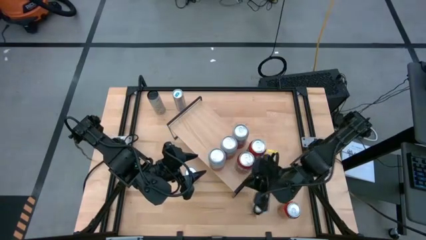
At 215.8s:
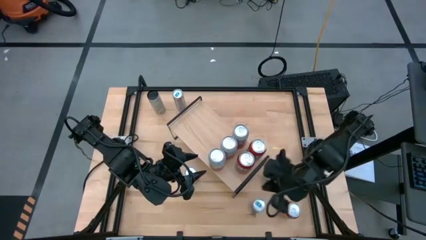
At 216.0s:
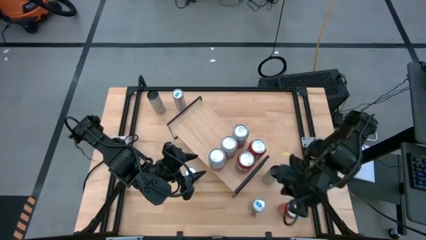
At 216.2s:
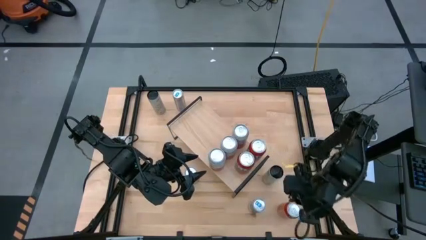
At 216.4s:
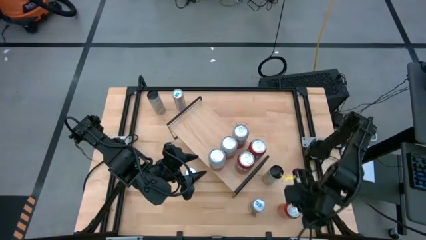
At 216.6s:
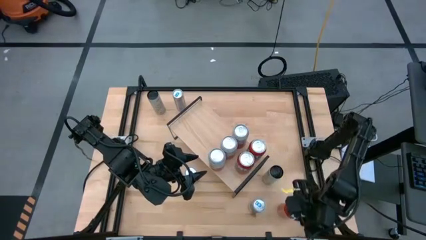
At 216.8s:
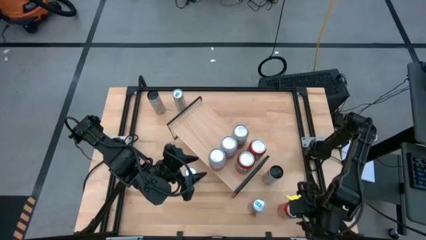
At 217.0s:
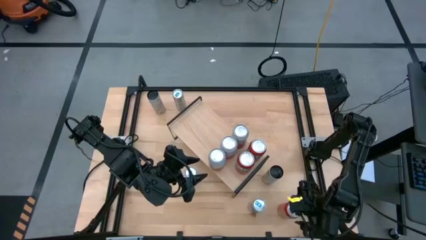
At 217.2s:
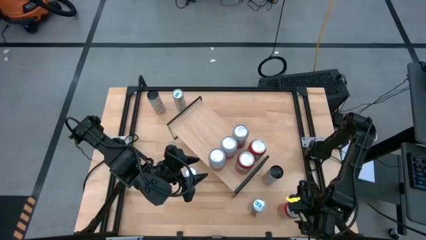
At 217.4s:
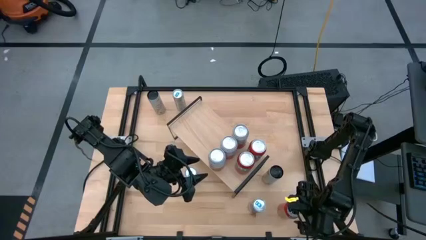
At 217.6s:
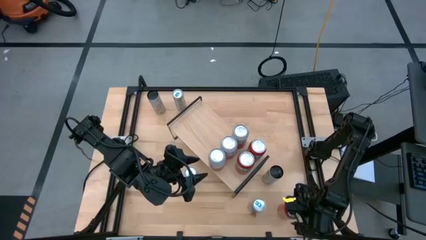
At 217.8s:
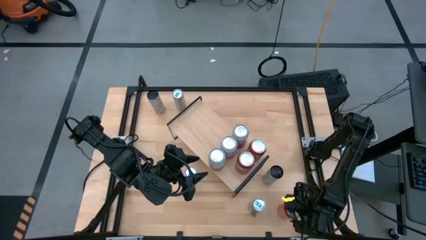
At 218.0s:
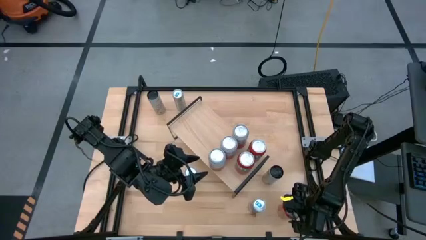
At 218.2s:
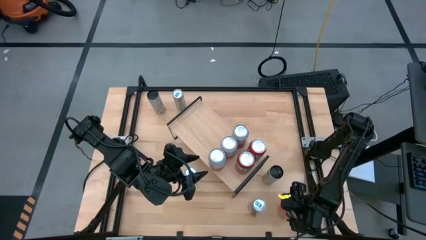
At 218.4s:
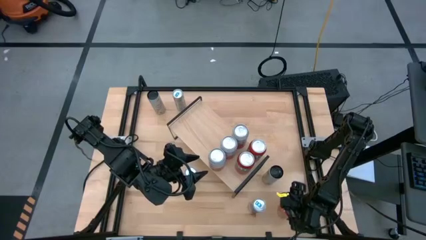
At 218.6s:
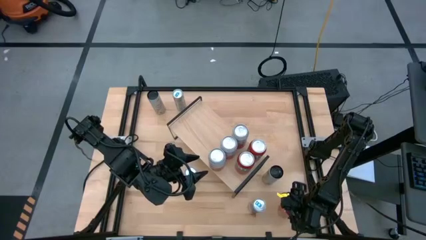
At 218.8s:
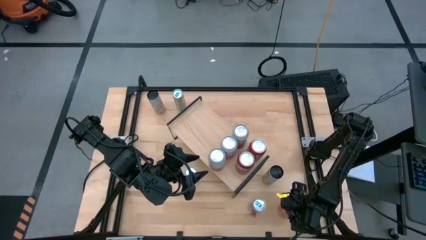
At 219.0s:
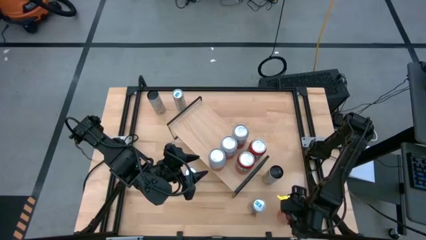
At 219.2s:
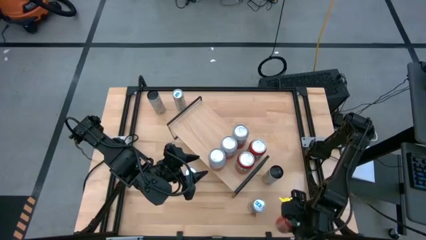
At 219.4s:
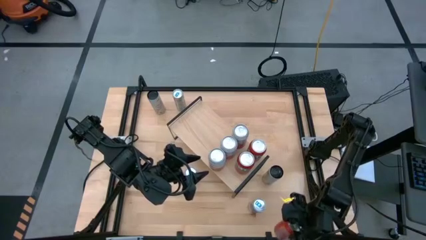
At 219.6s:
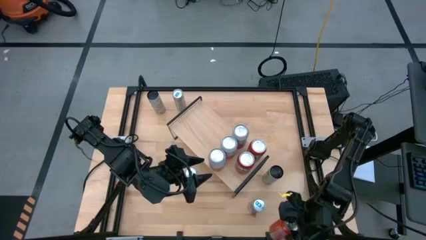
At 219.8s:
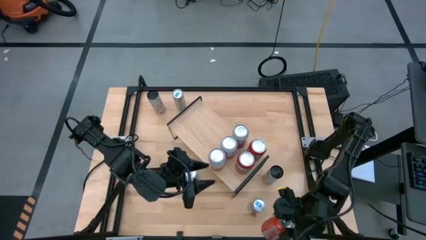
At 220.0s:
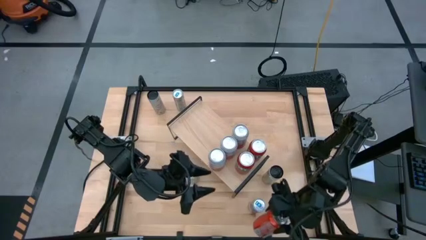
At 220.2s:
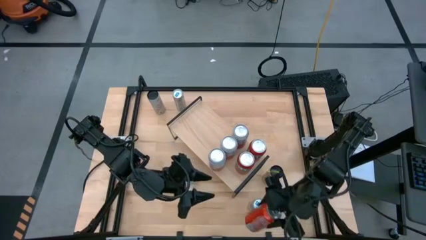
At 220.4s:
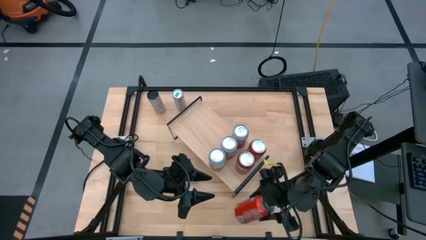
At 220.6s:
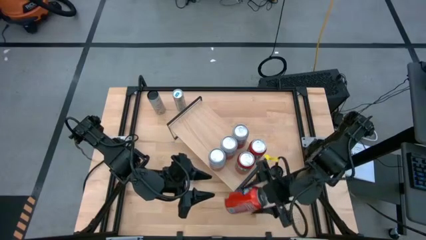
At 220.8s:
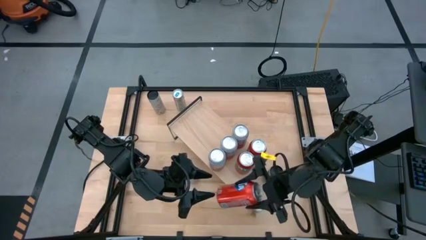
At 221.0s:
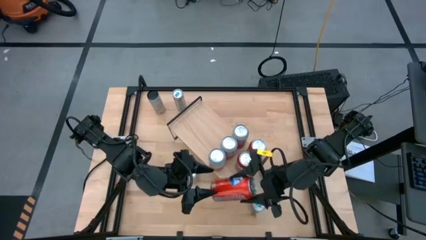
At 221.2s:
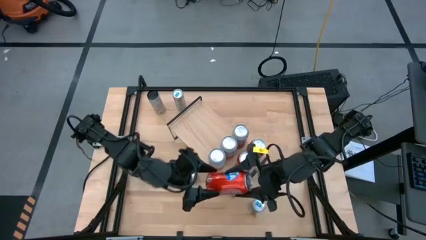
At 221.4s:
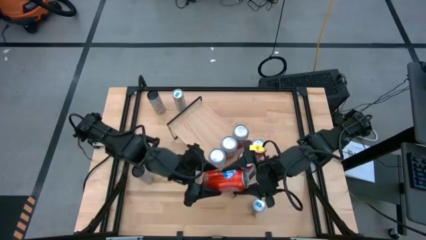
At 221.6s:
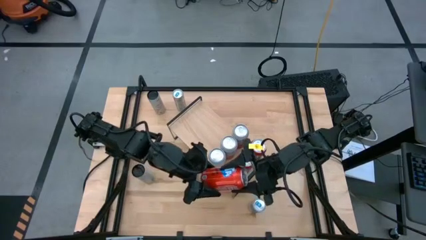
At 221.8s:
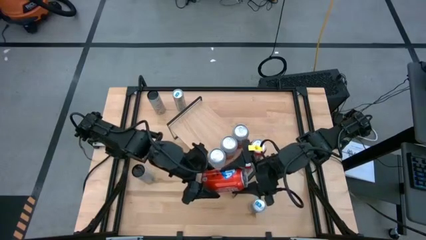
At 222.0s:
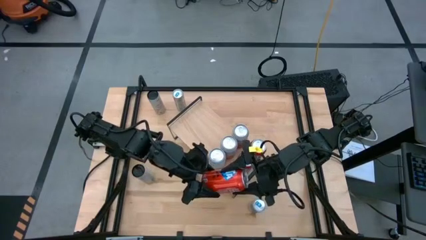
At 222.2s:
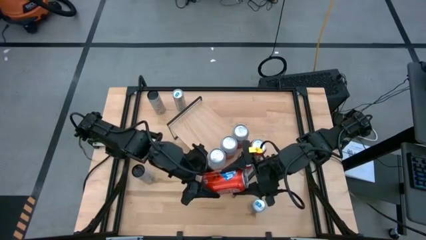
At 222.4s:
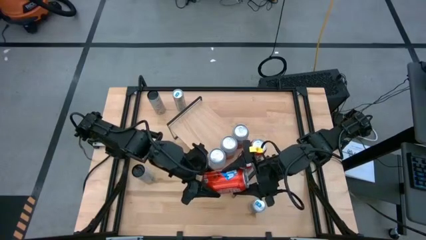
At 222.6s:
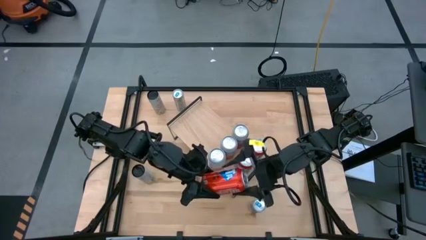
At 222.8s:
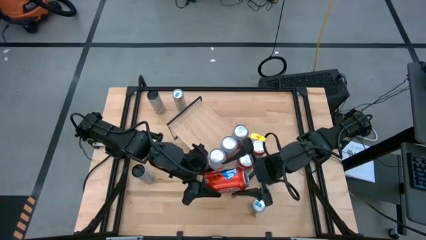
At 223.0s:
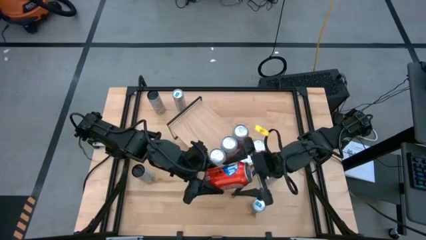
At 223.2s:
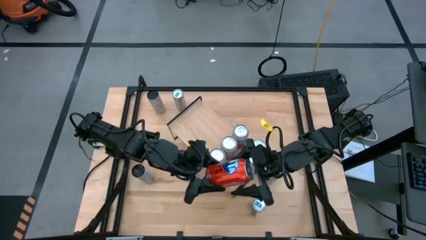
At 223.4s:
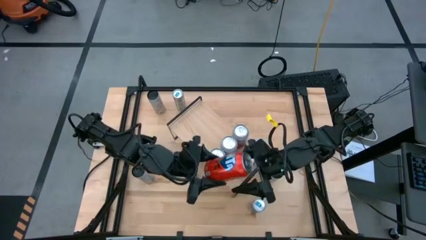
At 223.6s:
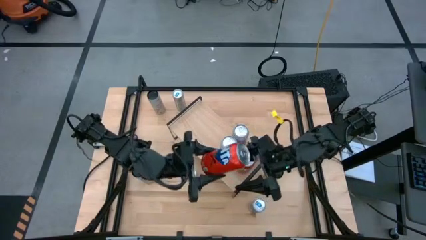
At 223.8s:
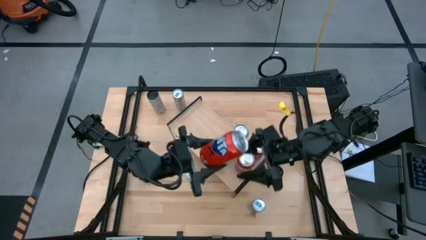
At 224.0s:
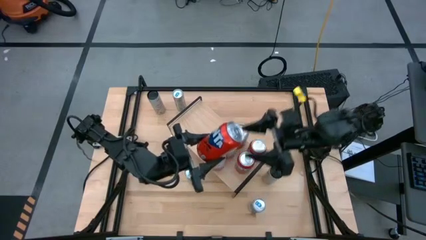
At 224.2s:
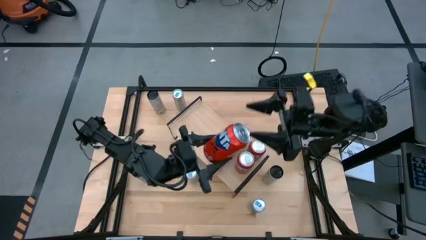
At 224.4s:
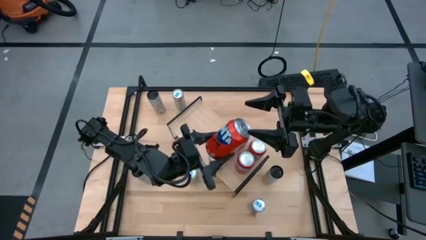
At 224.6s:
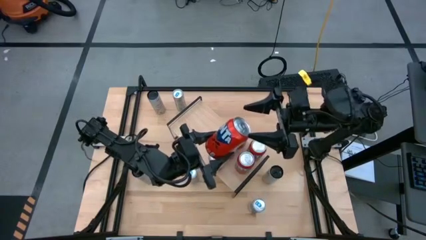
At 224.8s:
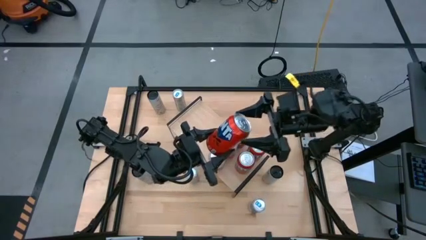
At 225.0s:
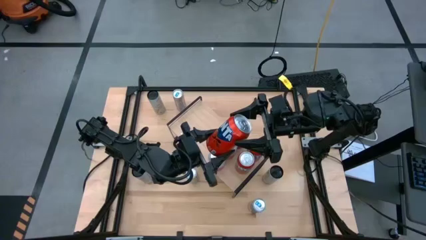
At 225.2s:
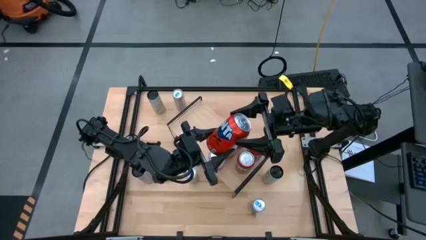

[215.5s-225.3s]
Task: Place canned beverage on shelf
Put the red soda can on the shelf aligned with the other red soda can

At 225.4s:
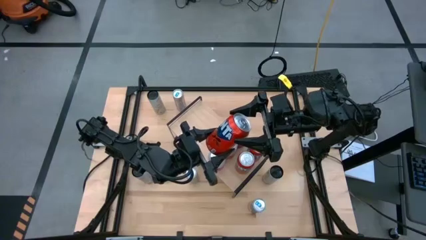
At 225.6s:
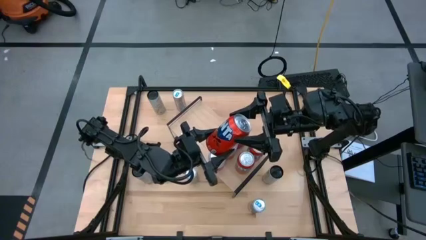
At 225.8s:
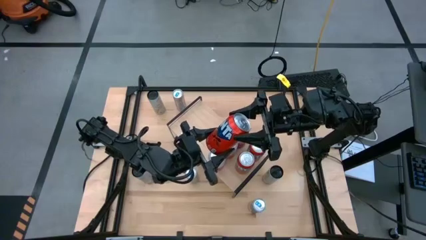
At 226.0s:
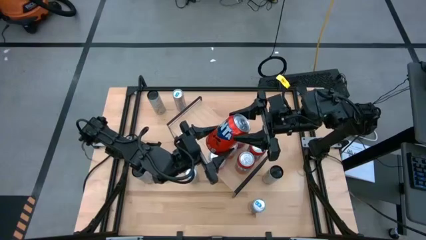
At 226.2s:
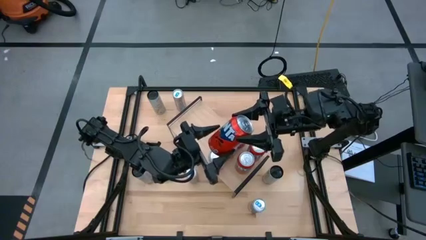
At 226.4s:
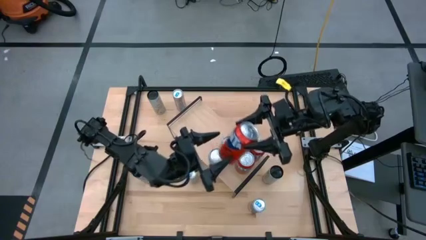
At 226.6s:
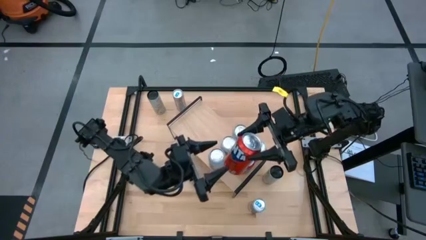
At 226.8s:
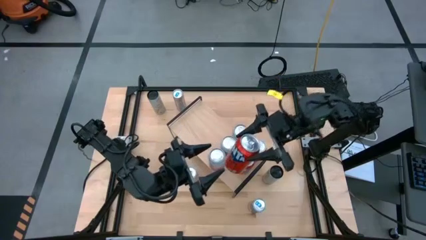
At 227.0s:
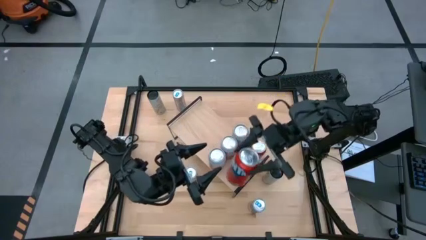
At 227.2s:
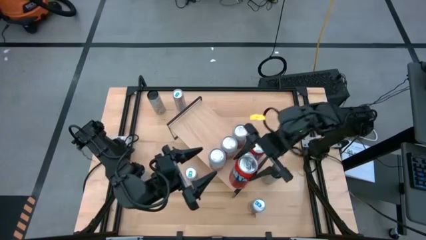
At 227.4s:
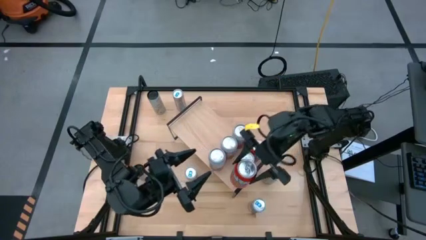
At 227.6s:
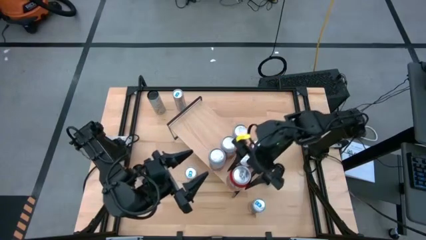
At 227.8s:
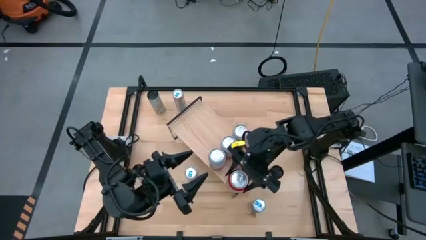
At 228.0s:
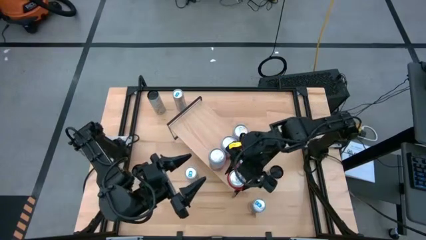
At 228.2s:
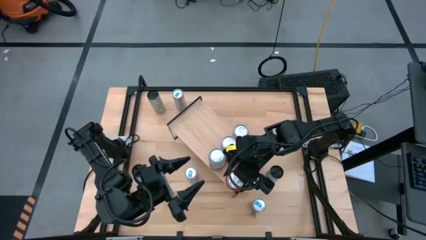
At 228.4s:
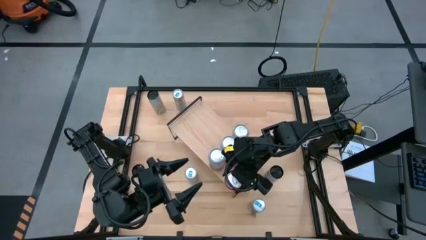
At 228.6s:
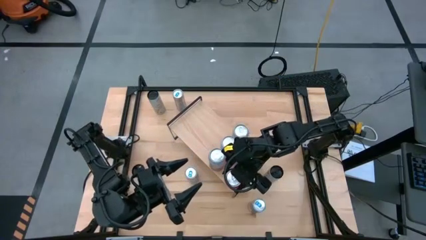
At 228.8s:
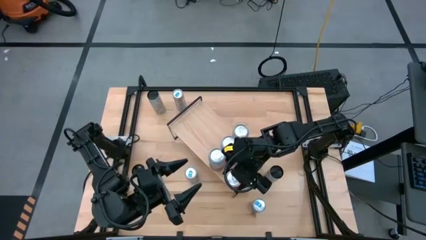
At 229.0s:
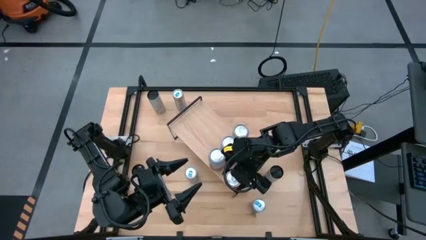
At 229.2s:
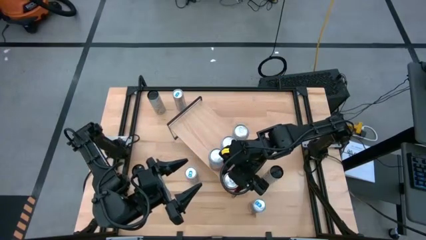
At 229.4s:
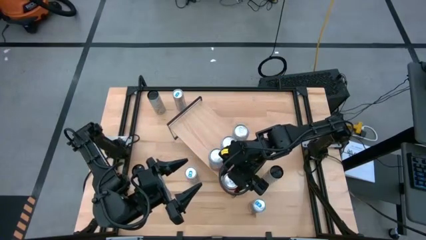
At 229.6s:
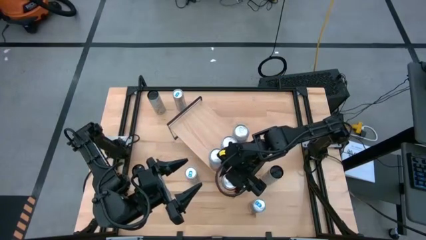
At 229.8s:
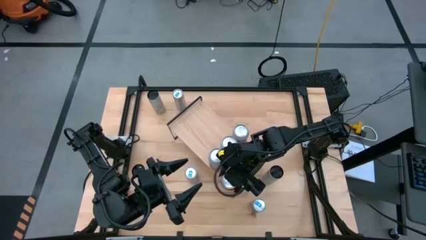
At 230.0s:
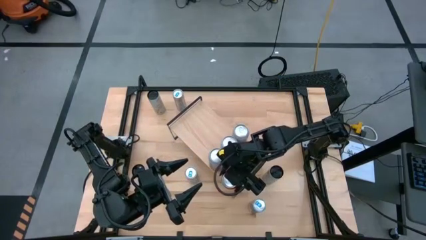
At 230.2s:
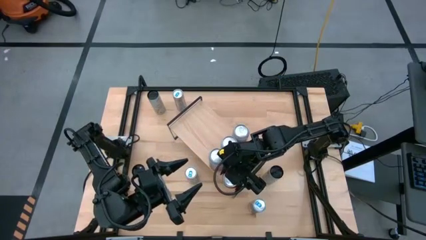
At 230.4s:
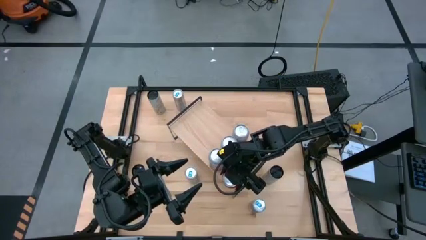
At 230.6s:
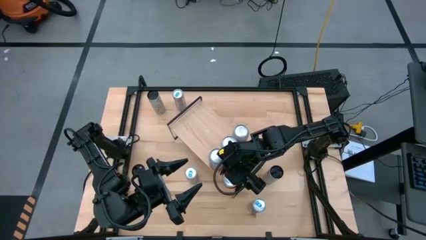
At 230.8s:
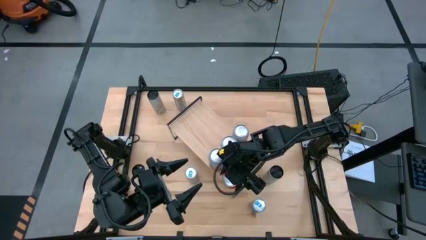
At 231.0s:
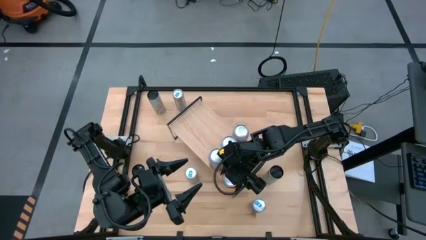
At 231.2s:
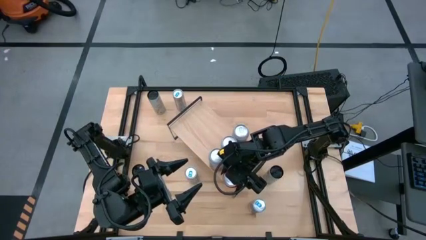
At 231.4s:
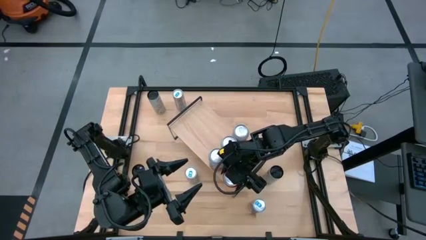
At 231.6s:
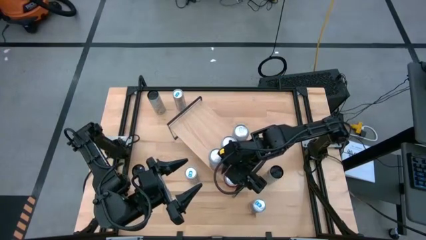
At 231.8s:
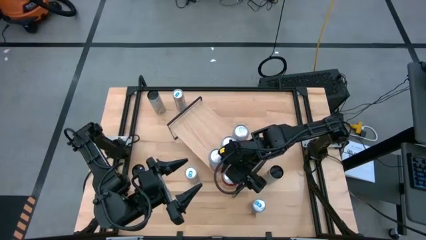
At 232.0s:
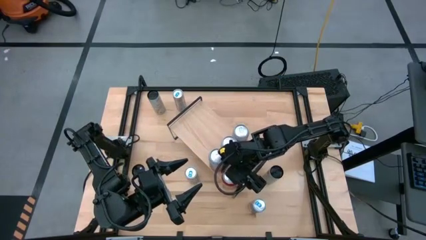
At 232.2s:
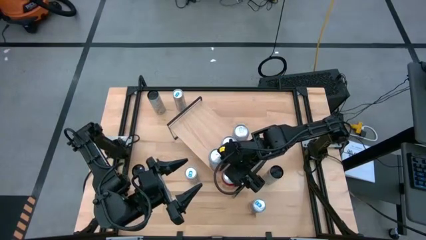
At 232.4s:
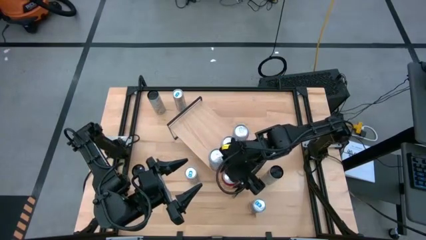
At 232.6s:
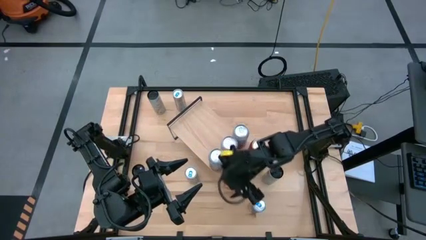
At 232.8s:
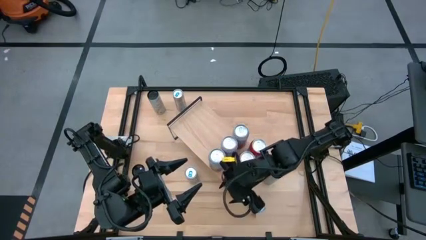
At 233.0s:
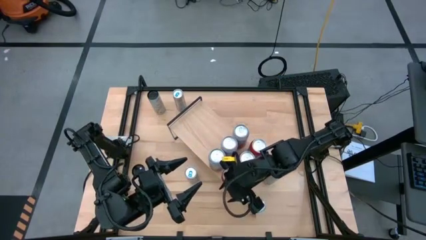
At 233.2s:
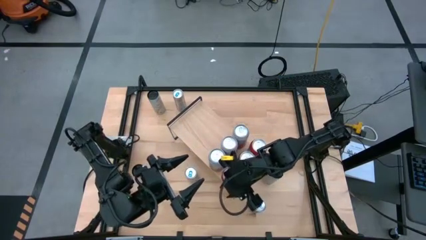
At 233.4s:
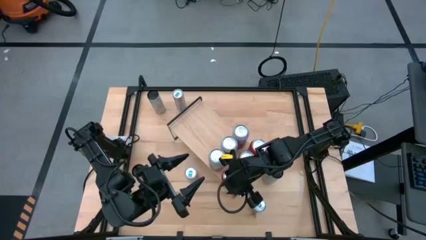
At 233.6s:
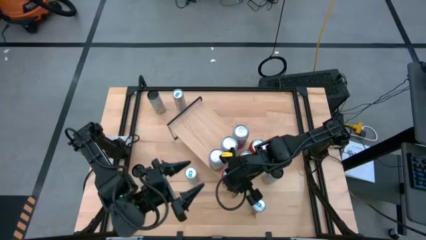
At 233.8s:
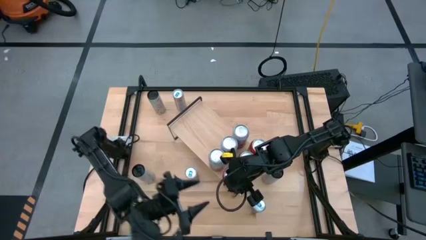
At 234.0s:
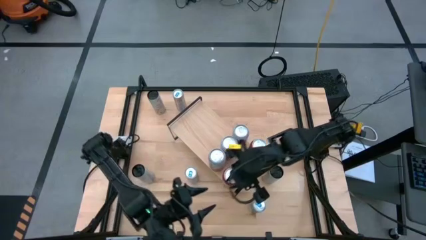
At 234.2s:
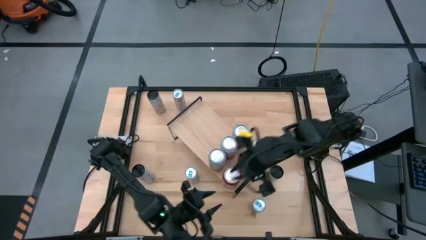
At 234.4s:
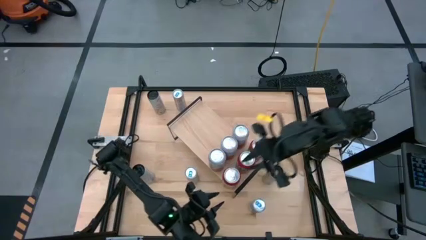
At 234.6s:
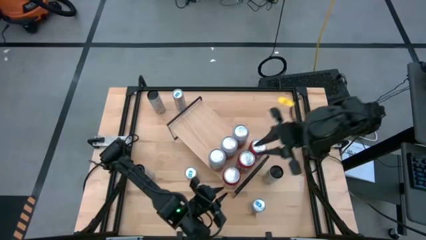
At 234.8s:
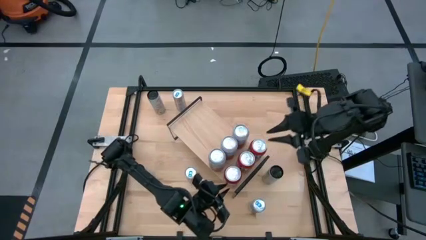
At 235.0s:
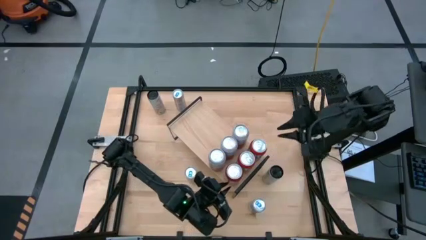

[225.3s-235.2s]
Put the red soda can on the shelf aligned with the other red soda can
